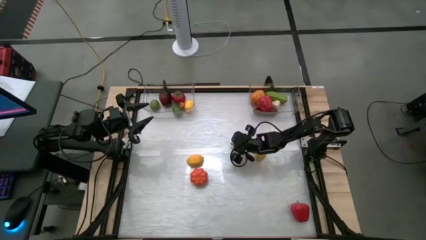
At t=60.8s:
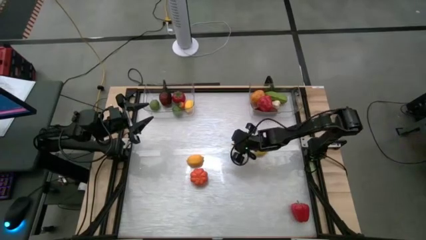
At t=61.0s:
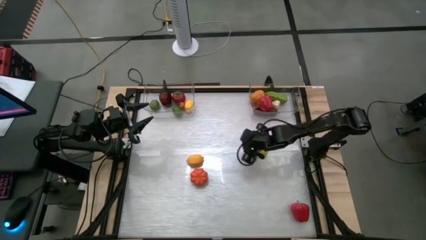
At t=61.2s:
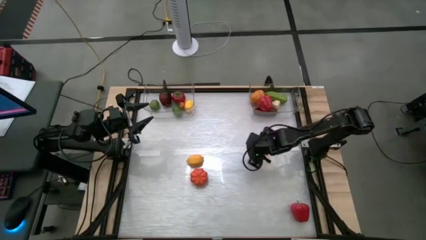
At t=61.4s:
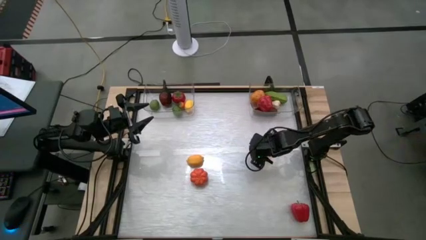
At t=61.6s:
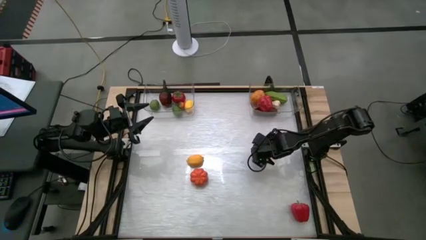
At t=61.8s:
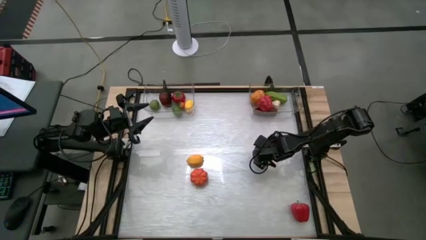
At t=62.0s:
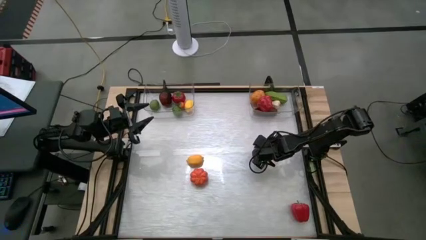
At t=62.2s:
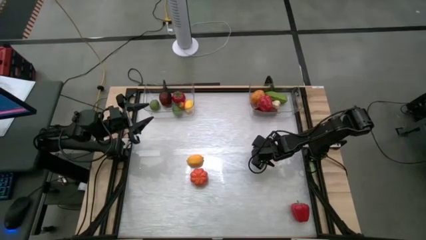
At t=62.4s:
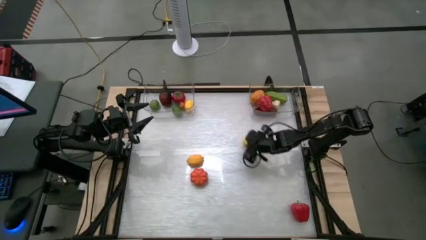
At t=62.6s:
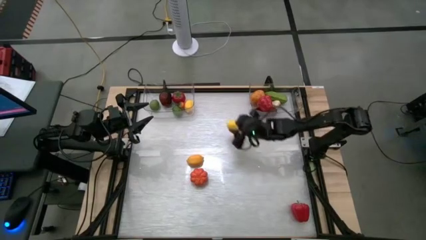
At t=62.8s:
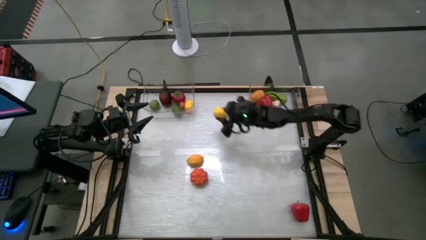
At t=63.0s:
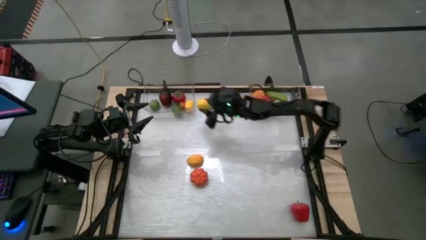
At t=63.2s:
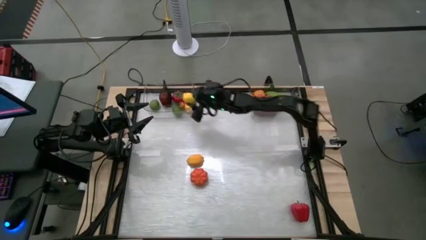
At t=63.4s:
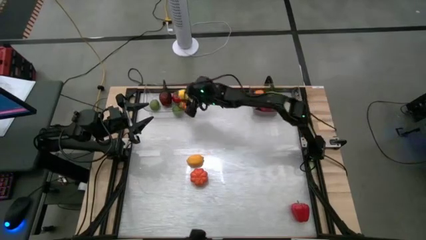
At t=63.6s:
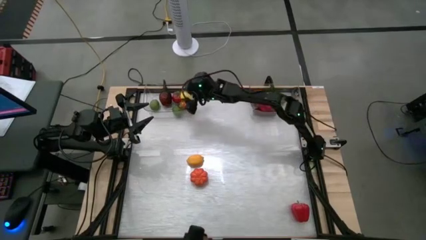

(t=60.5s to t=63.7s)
Task: Sort produce into baskets
Put the right yellow lemon into the left transparent bin

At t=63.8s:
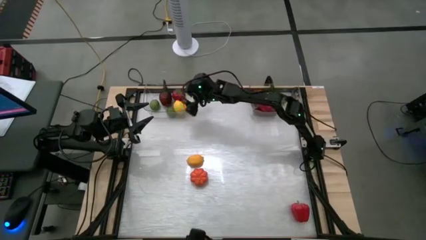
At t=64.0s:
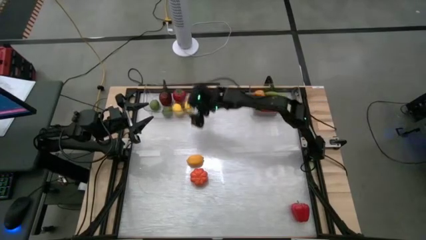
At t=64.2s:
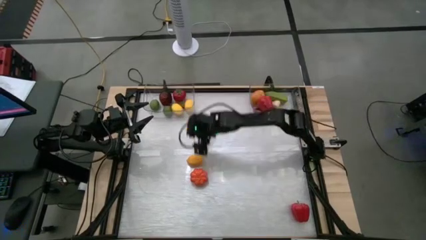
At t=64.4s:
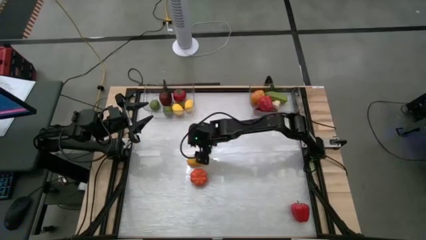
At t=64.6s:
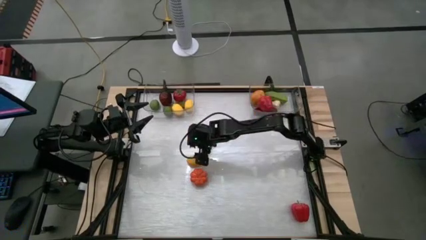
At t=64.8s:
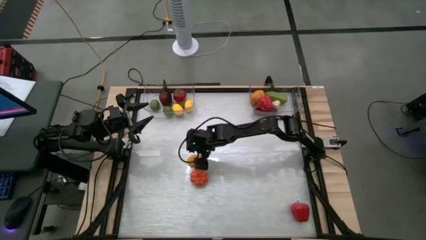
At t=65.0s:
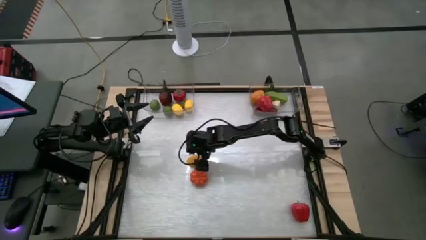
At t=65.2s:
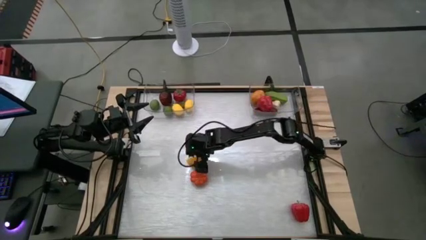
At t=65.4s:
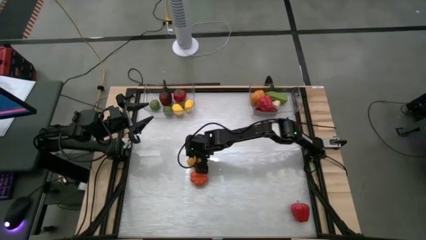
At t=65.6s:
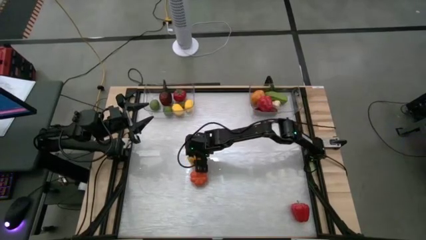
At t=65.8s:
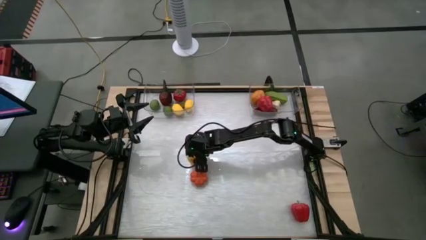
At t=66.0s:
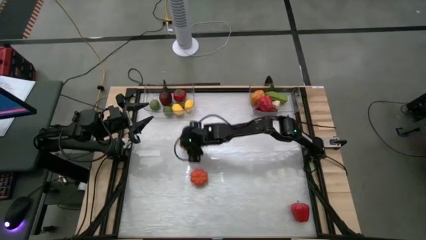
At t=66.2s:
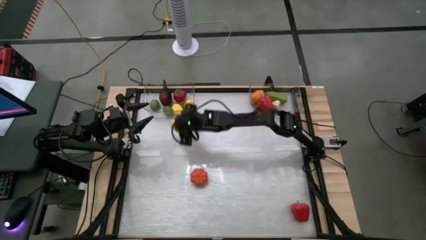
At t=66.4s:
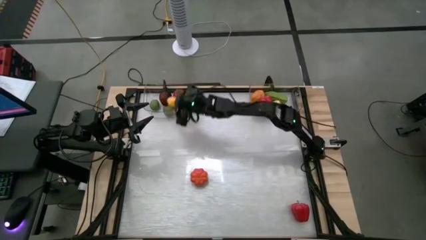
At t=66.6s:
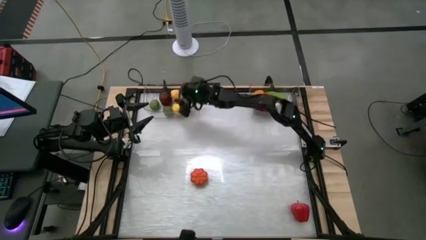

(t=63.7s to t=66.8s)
Put the lemon into the left transparent bin

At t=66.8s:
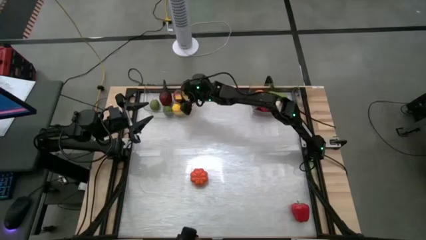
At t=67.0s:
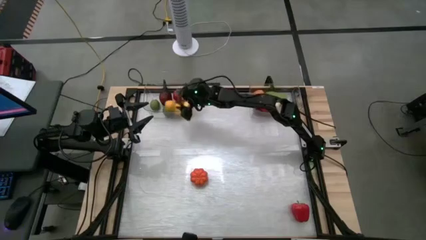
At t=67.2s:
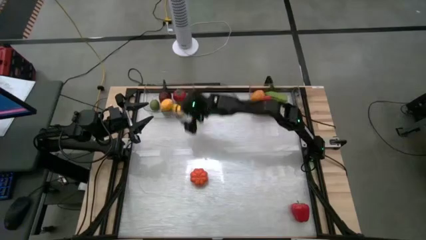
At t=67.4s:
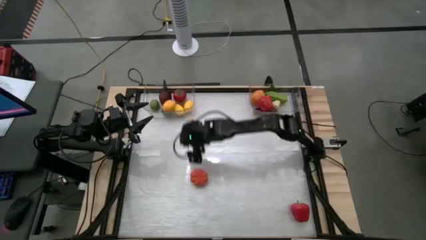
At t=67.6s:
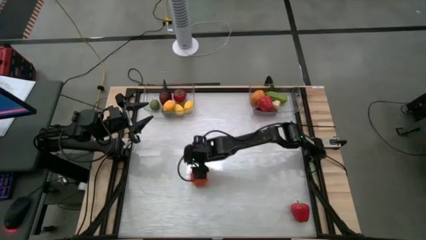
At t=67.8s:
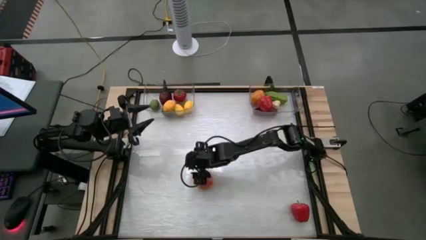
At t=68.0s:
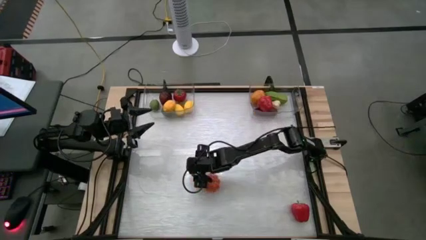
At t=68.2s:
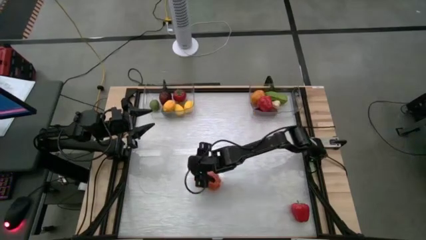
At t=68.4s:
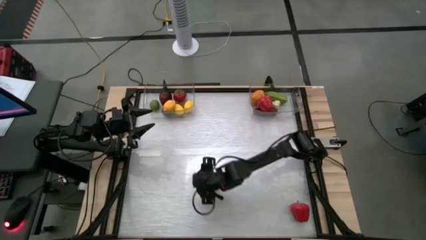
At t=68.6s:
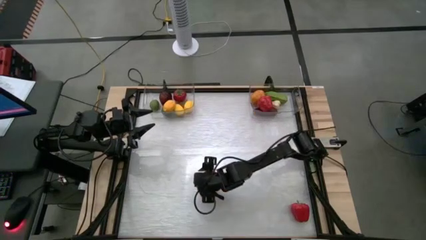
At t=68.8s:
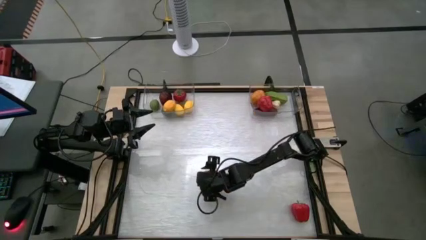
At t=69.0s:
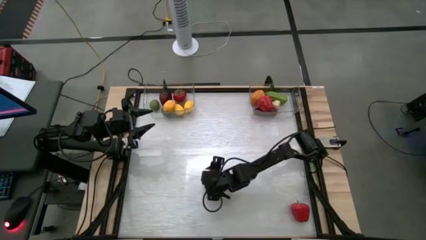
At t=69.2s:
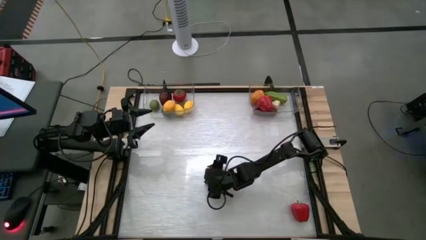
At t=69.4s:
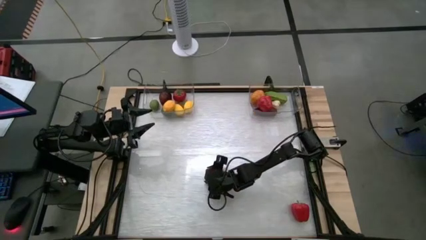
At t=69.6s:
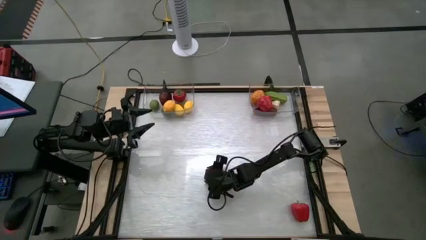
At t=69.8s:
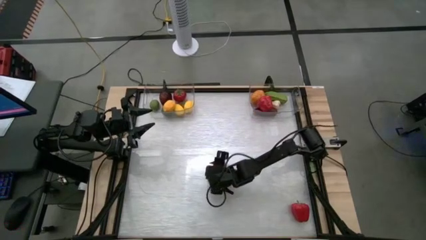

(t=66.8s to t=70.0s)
Put the orange pumpkin into the right transparent bin

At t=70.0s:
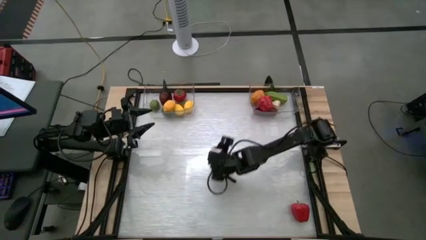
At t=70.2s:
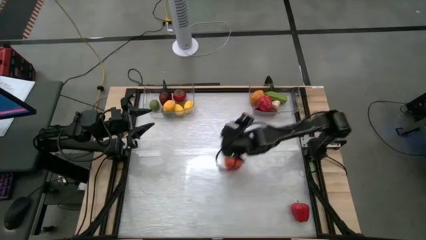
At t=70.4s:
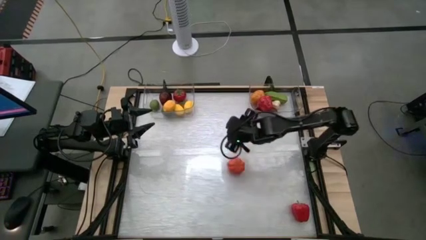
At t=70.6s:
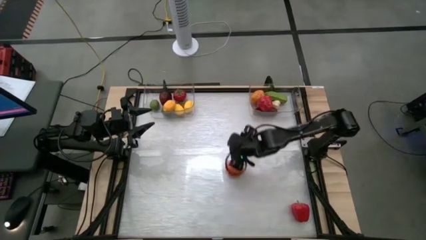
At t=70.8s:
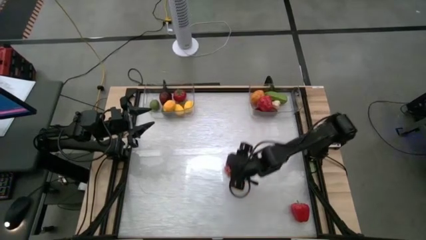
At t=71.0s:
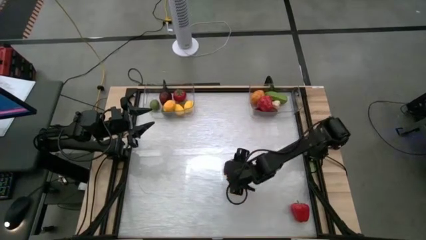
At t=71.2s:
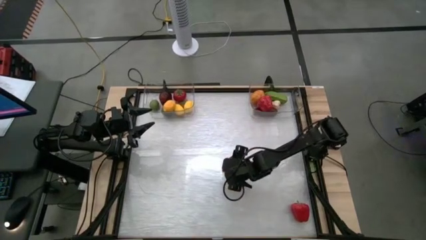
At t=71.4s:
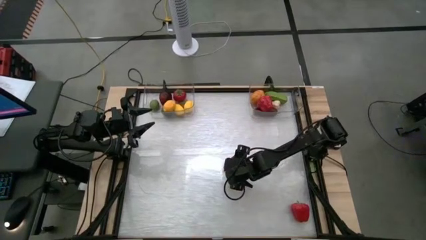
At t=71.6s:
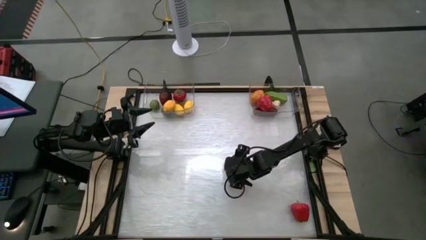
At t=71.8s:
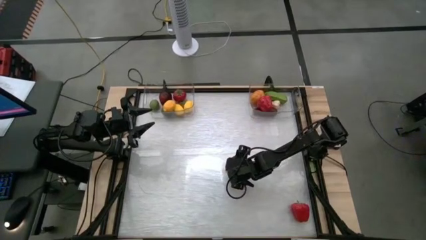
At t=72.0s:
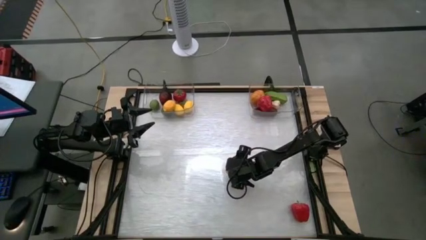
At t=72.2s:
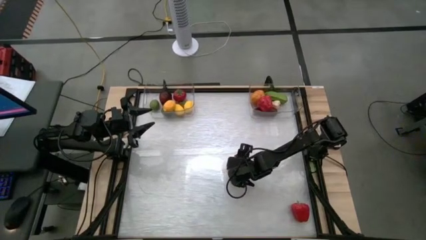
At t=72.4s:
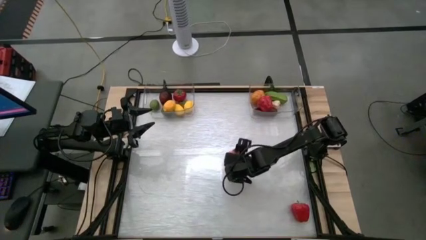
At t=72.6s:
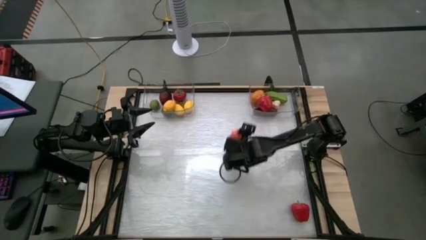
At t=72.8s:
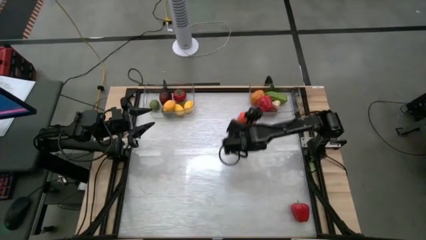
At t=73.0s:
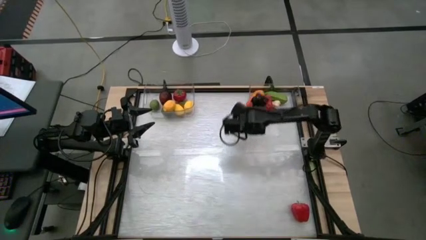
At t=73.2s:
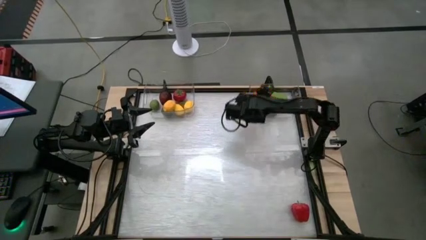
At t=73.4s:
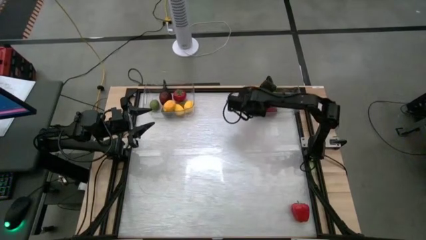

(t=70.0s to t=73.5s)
Put the orange pumpkin into the right transparent bin

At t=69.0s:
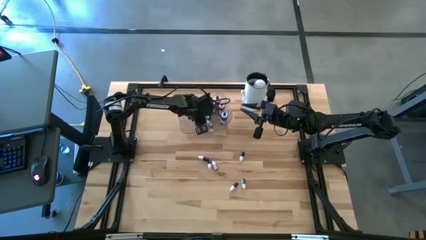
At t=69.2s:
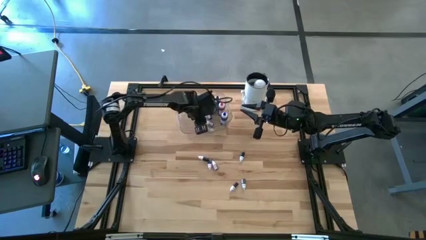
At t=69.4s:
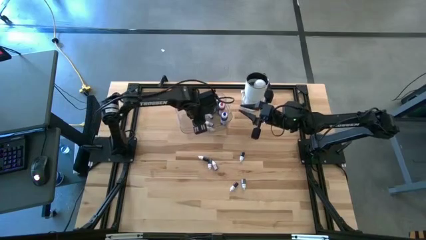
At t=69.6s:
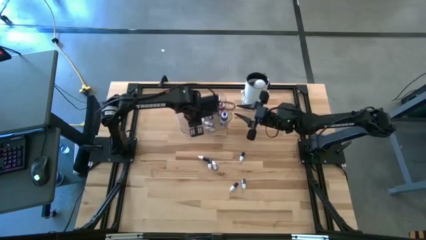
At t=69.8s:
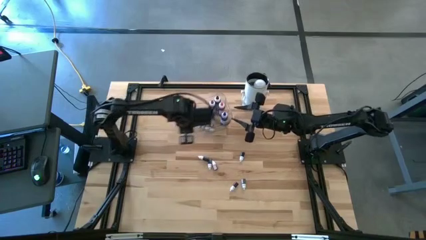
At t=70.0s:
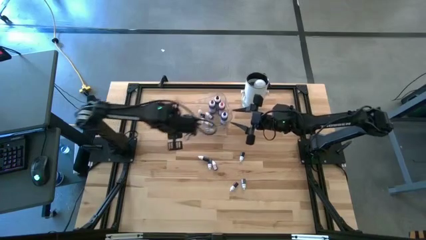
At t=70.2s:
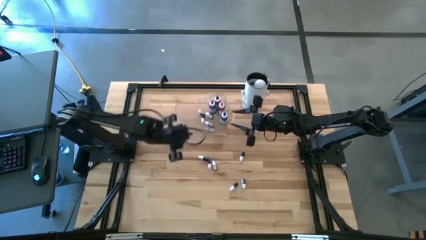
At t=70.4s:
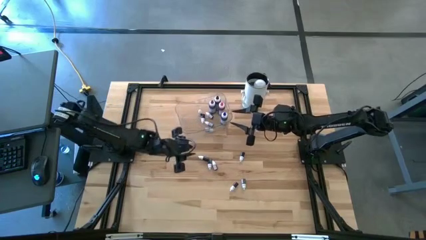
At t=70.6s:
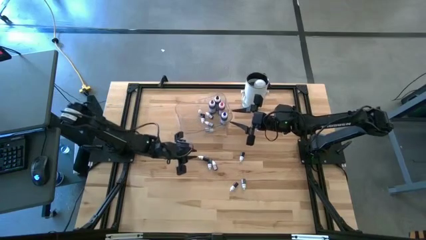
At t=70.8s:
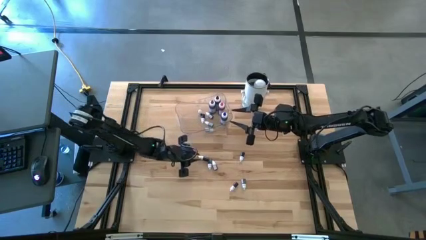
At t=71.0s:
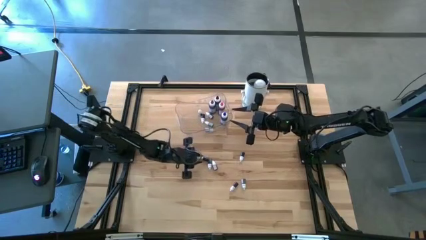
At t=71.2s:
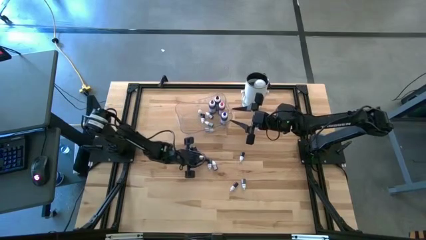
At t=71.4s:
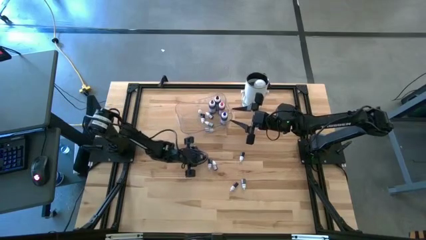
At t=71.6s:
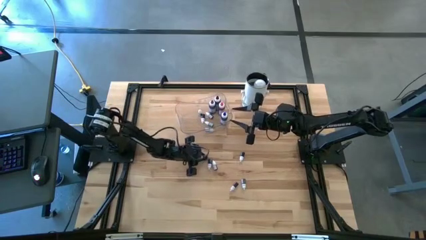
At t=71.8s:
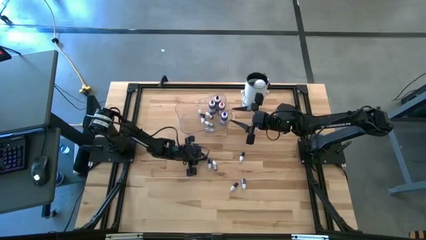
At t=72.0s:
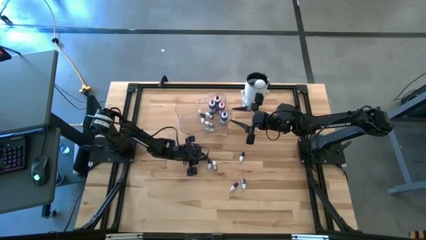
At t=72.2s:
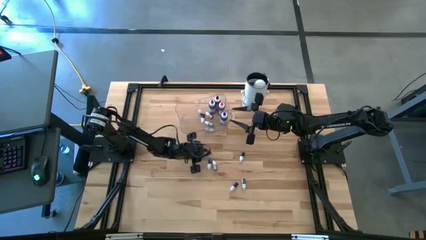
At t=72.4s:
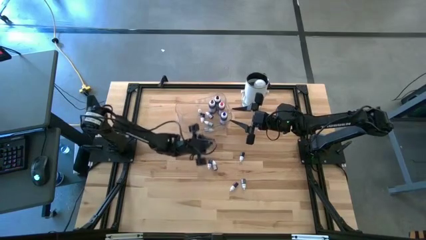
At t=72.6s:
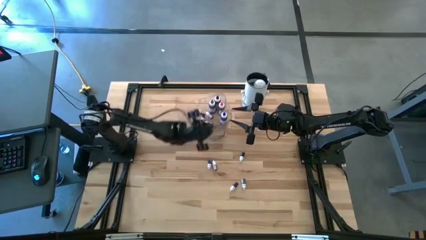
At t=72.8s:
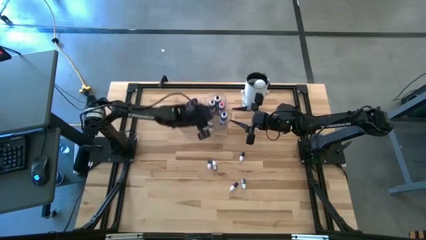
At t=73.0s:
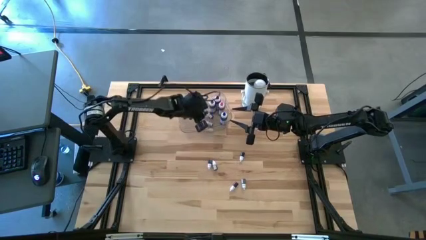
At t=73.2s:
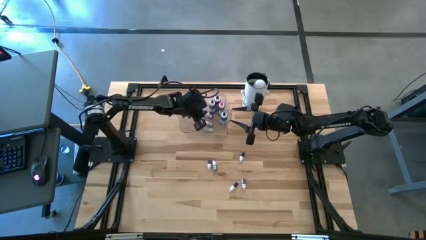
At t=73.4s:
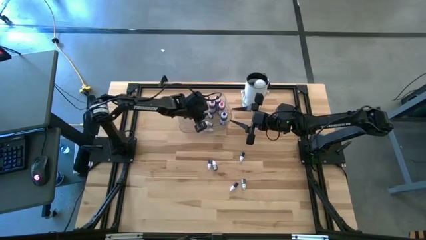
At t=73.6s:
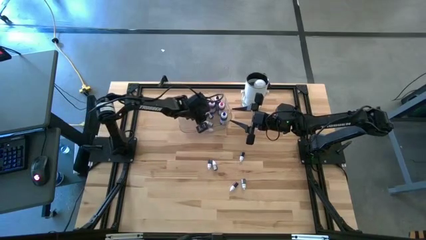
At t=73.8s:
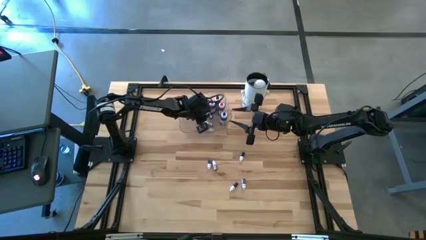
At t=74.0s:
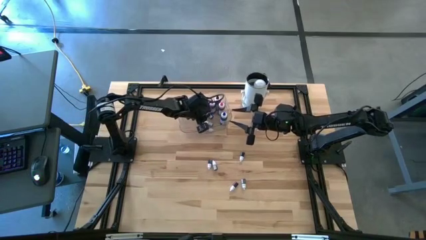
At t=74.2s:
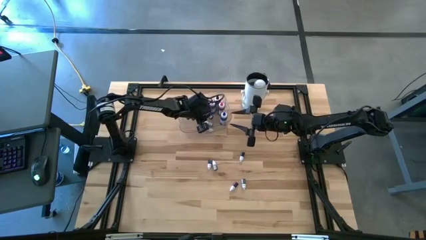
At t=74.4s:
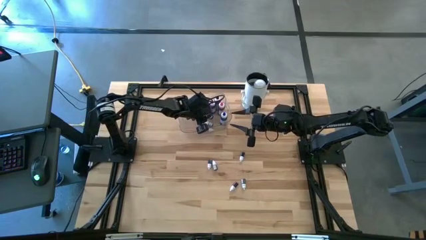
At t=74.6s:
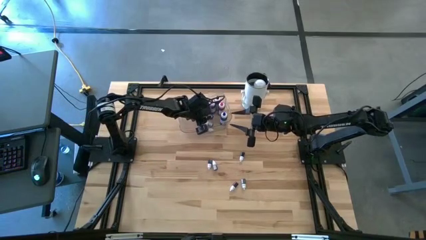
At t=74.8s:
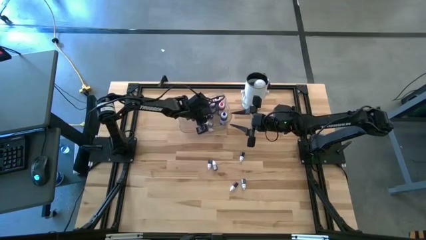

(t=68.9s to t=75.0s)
Task: Pick & Place food coloring
Put the small black food coloring bottle into the transparent container
